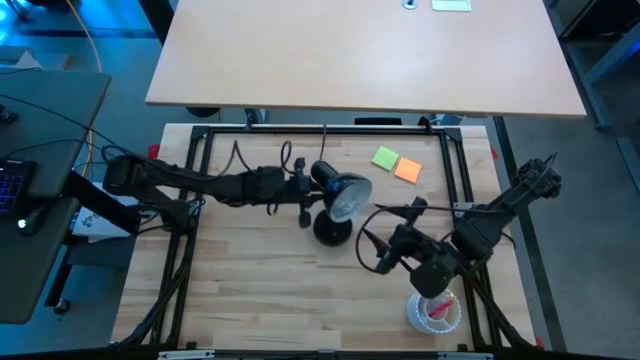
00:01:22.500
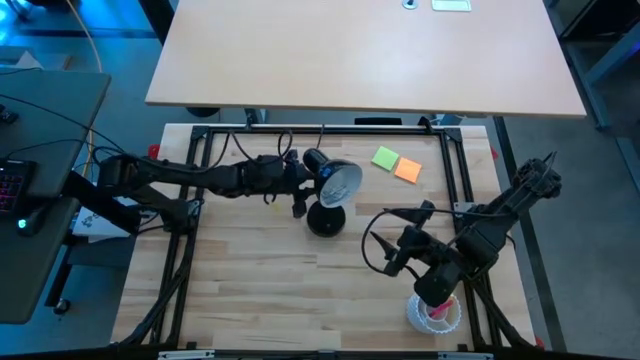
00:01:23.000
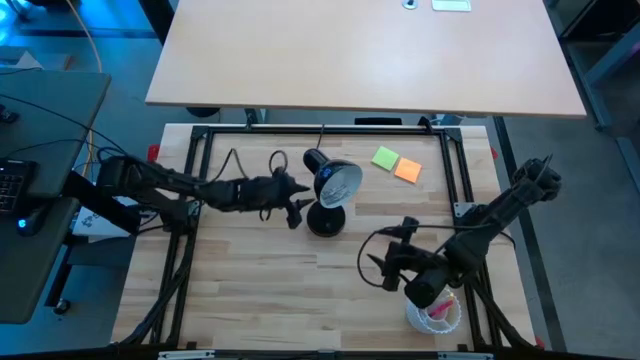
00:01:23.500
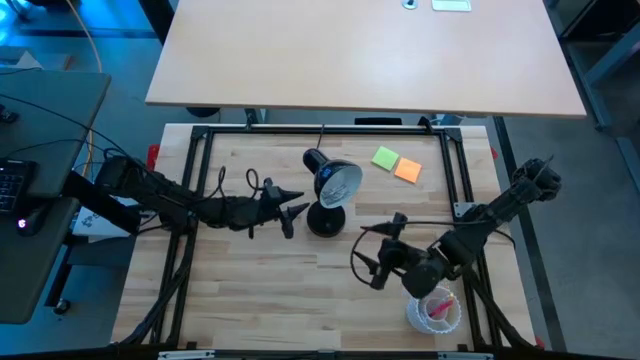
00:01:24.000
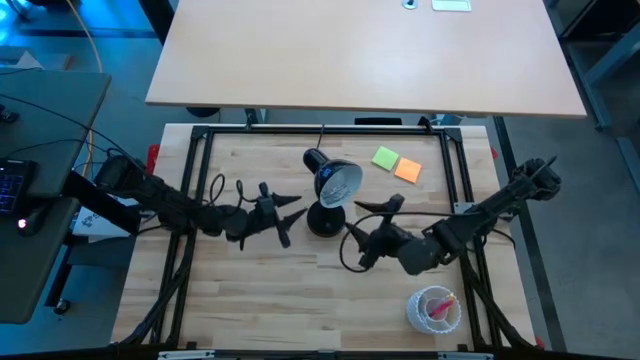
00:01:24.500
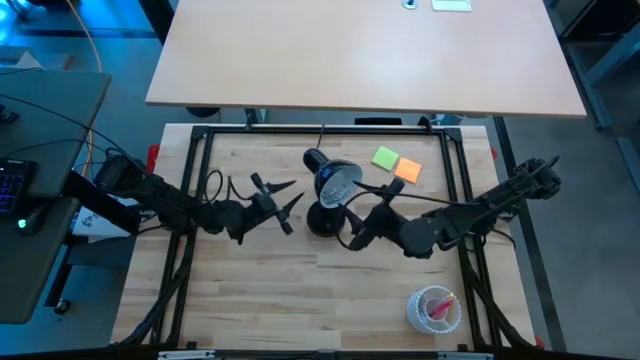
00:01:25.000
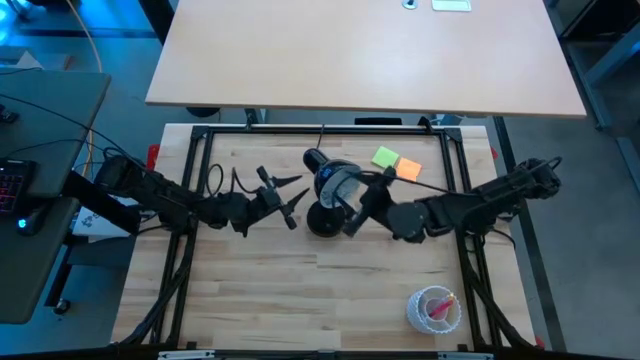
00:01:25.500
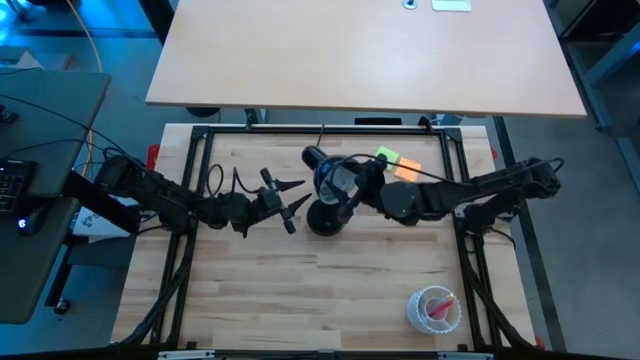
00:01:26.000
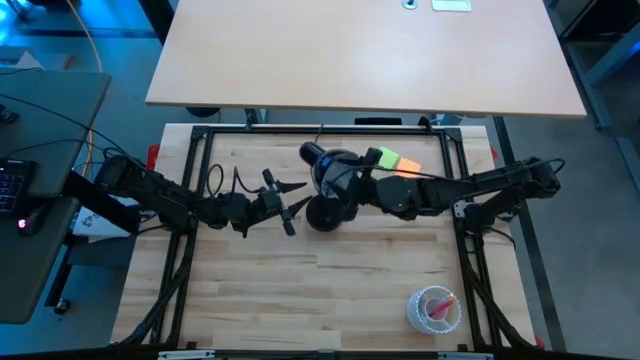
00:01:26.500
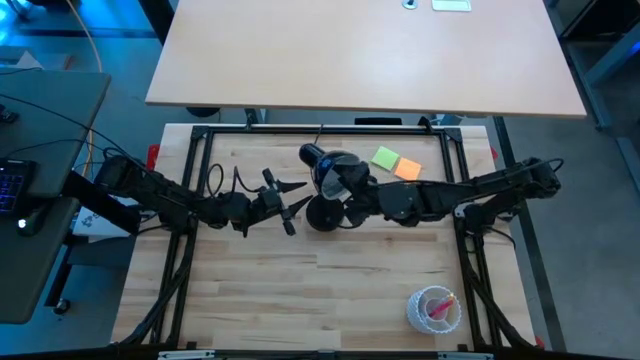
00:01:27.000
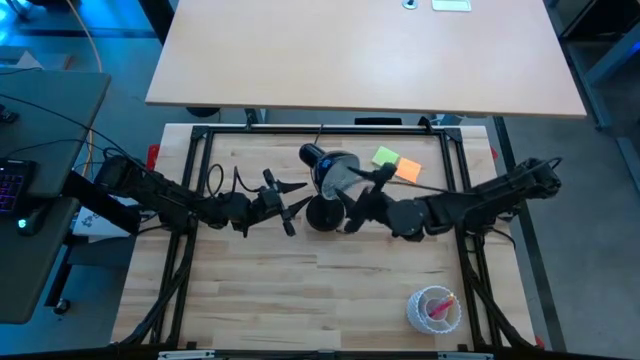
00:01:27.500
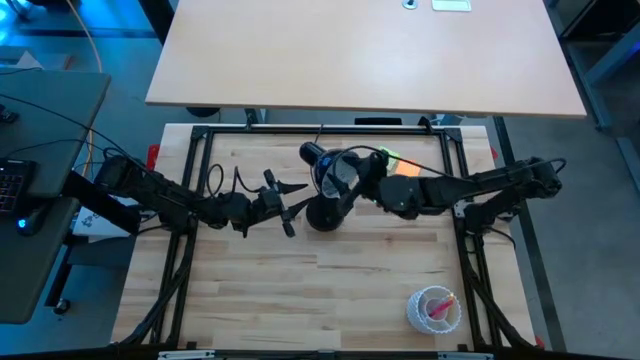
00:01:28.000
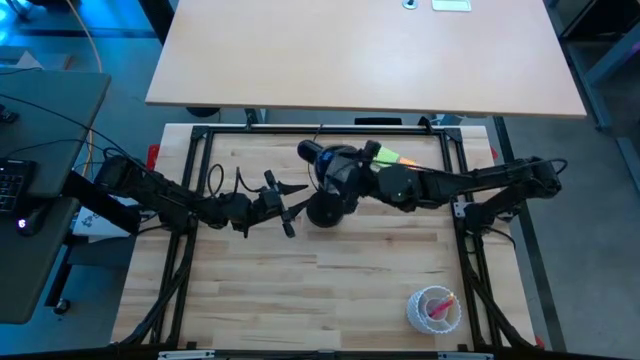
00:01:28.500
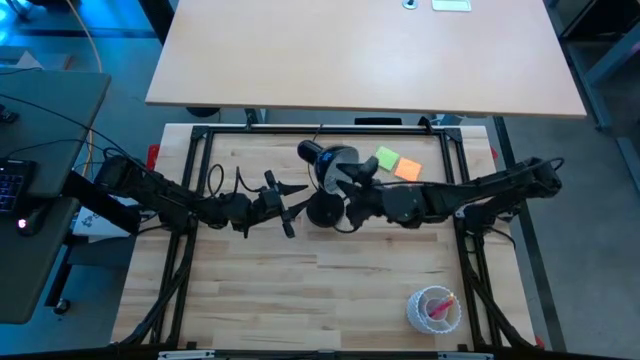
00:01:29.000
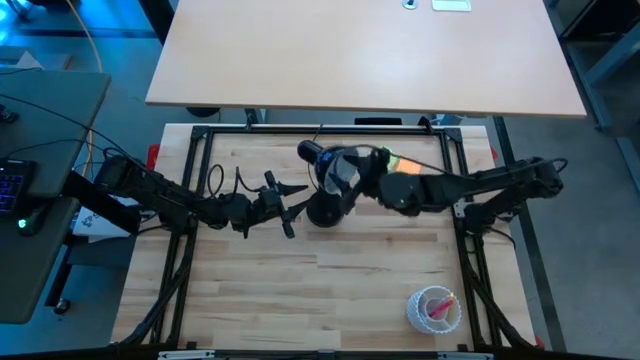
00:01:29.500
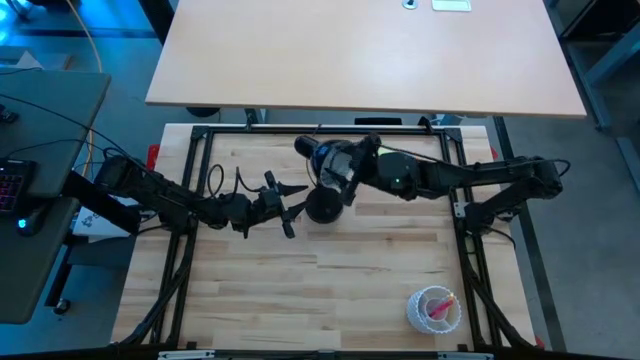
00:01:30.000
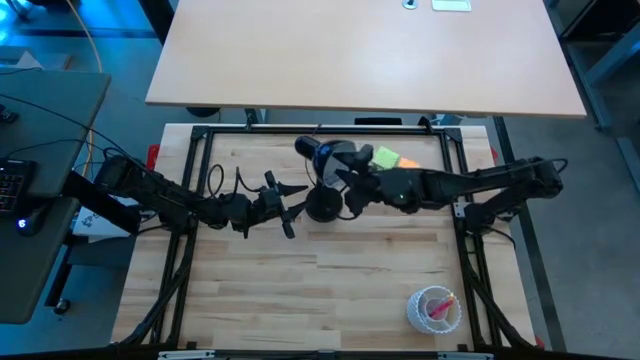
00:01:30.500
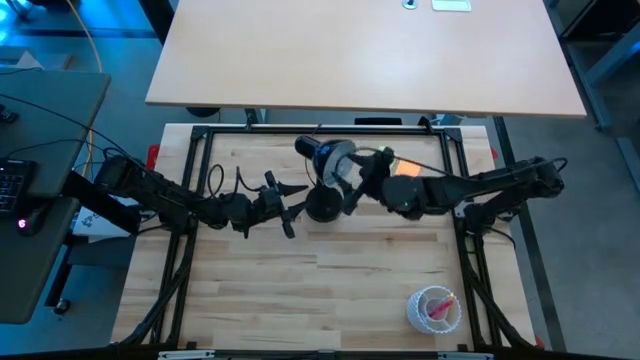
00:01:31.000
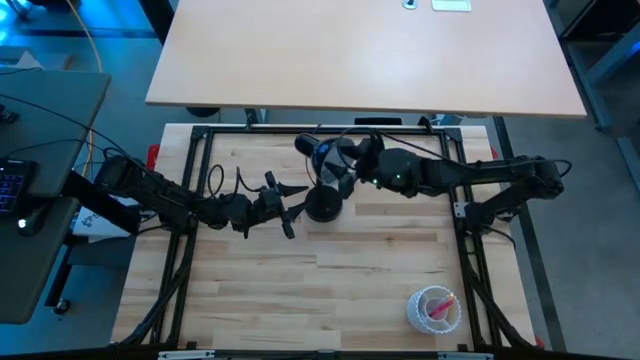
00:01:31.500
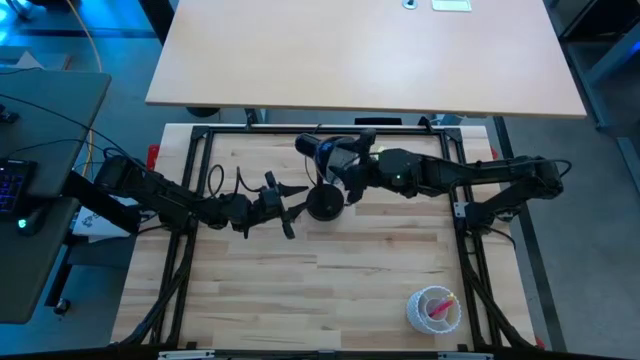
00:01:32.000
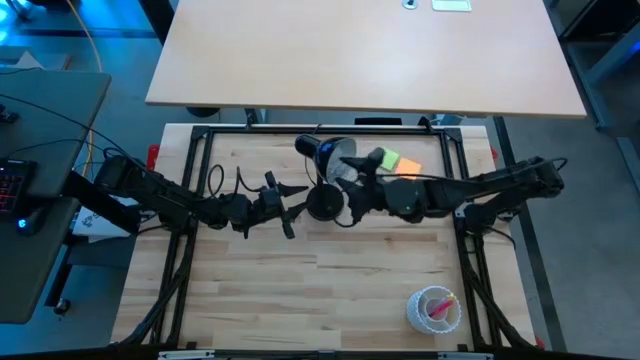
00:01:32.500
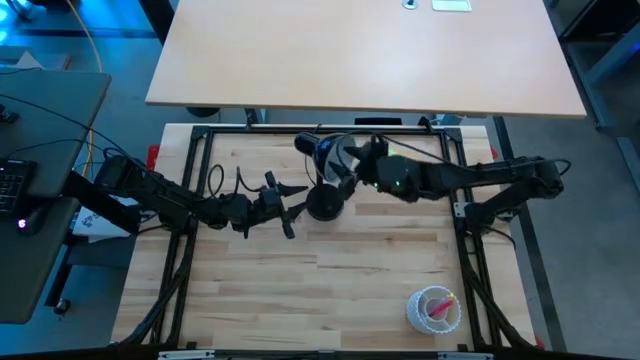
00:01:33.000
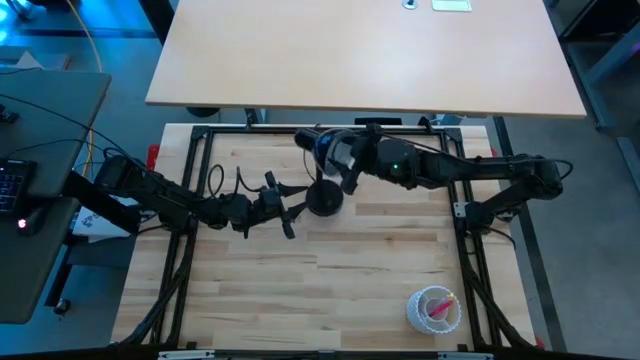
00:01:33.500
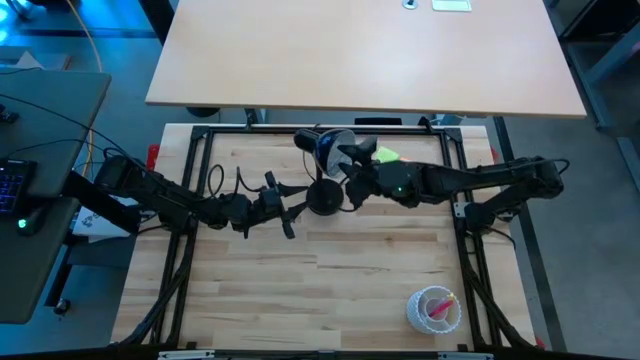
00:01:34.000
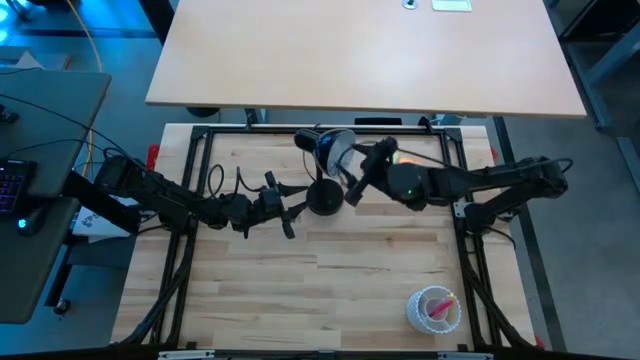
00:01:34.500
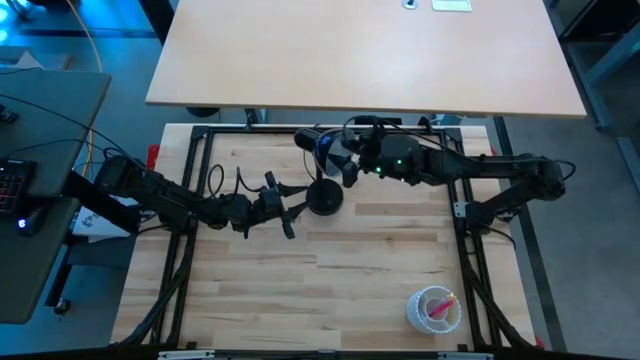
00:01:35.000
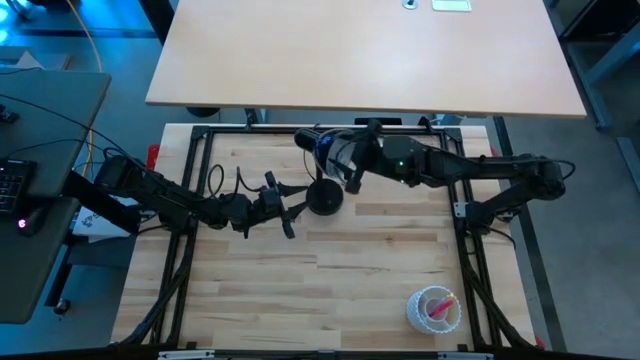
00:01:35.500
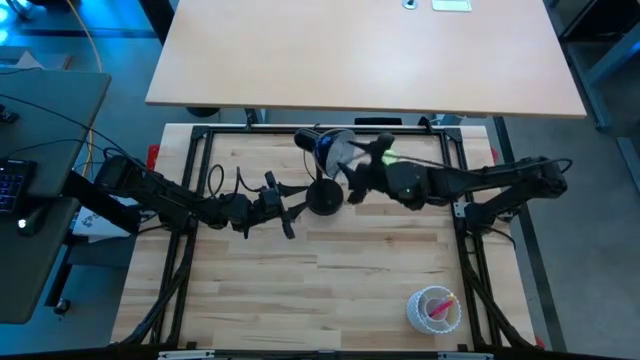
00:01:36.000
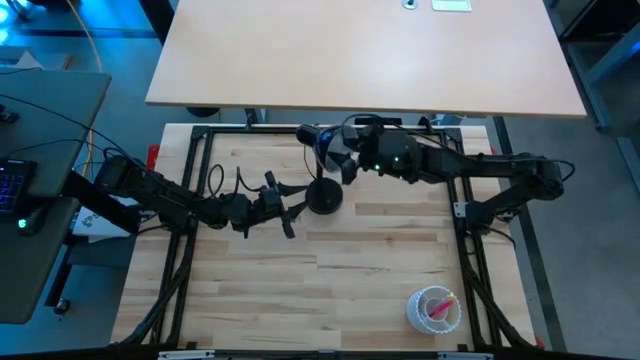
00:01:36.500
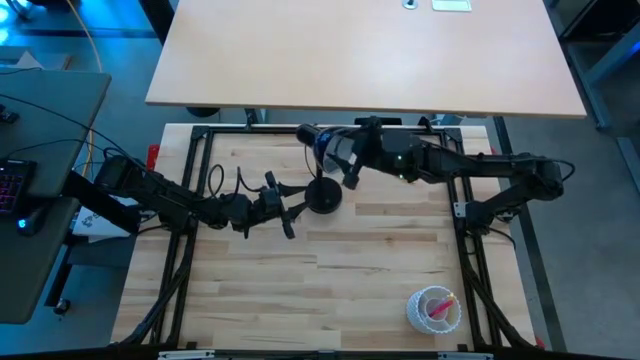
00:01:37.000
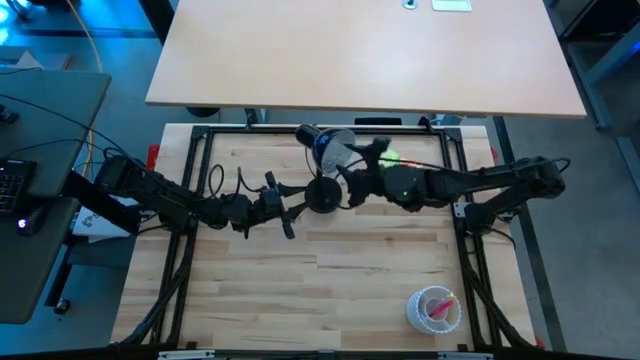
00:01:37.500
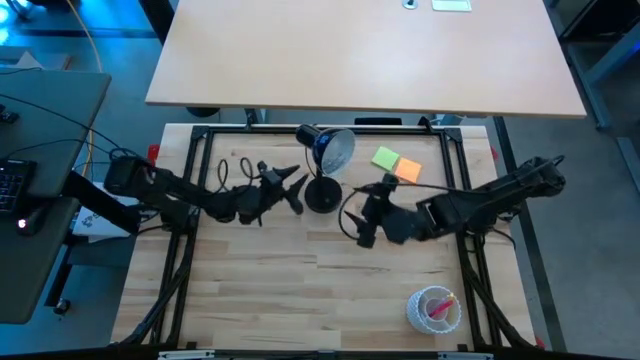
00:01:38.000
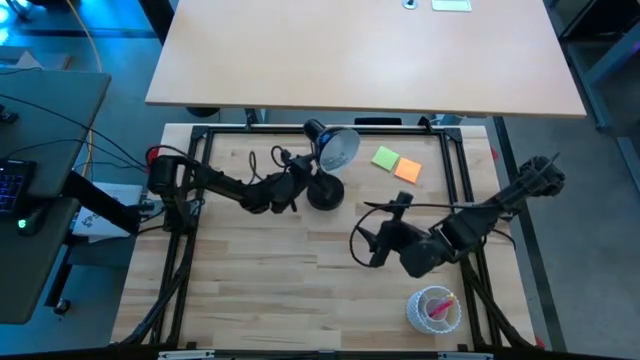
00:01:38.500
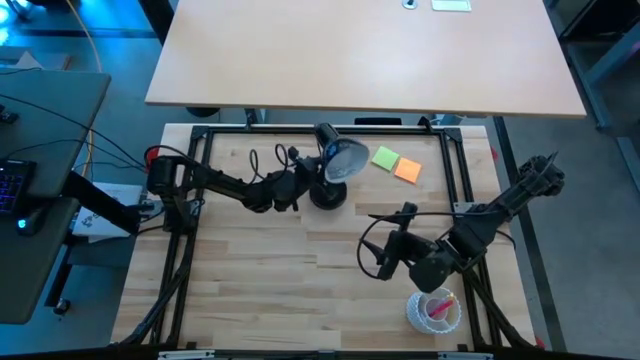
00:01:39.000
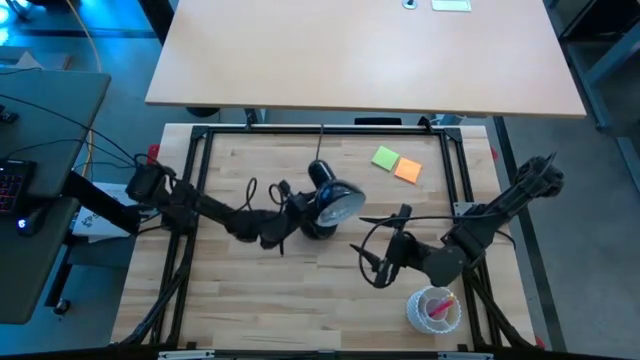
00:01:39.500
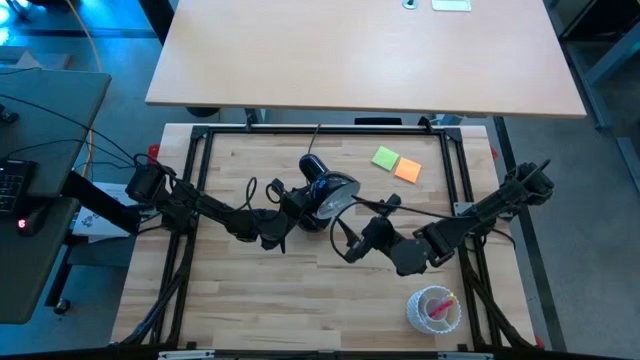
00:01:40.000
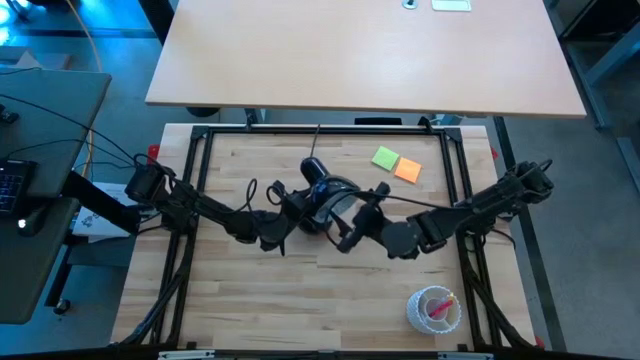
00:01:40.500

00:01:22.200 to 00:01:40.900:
Task: Screw lightbulb
Remove the white lightbulb from the black lamp

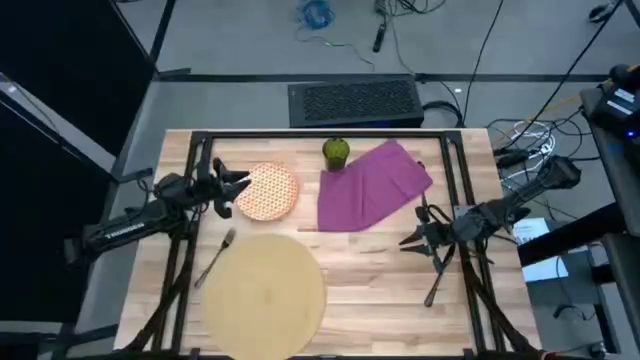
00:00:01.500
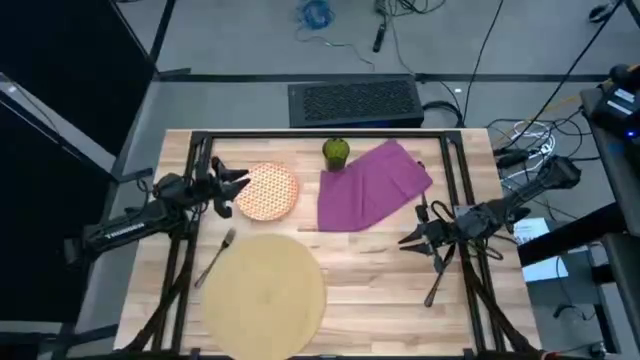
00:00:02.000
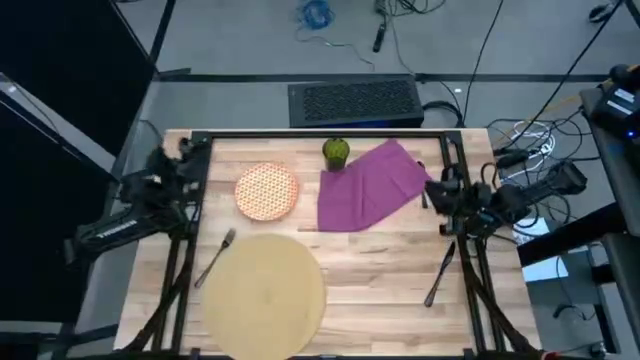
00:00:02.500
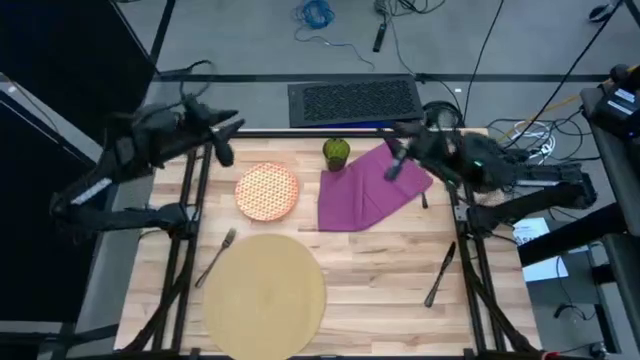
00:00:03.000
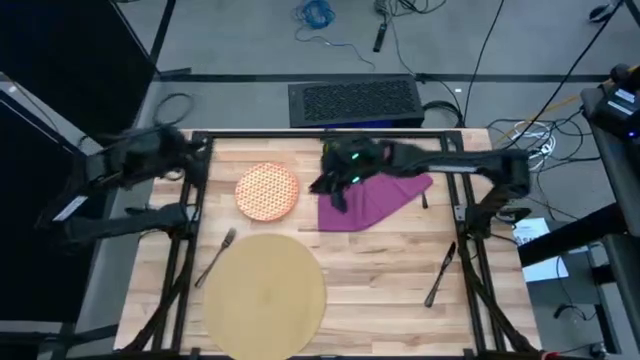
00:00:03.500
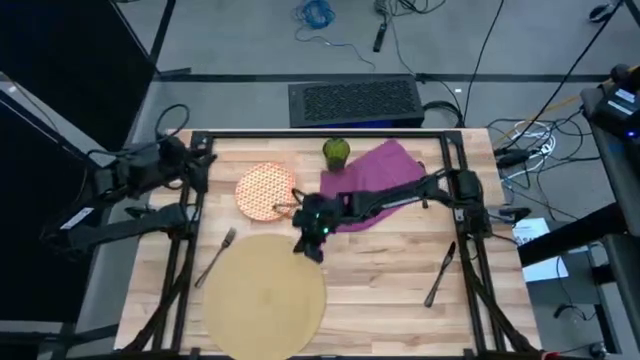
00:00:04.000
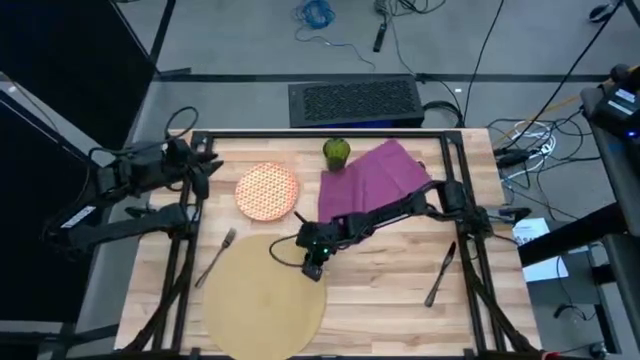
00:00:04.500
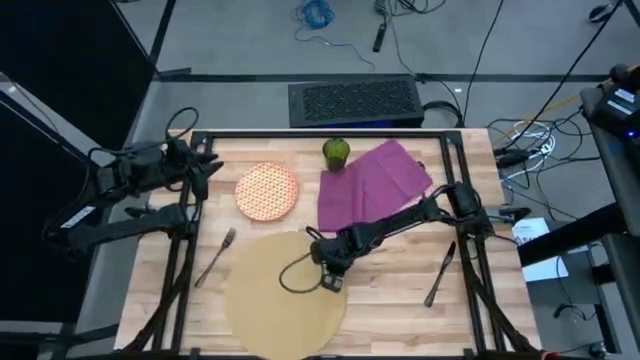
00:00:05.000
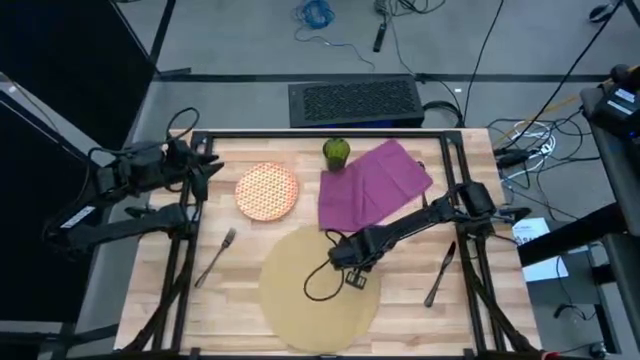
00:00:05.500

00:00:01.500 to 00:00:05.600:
Task: Set table place
Move the brown placemat to the bottom center of the table
